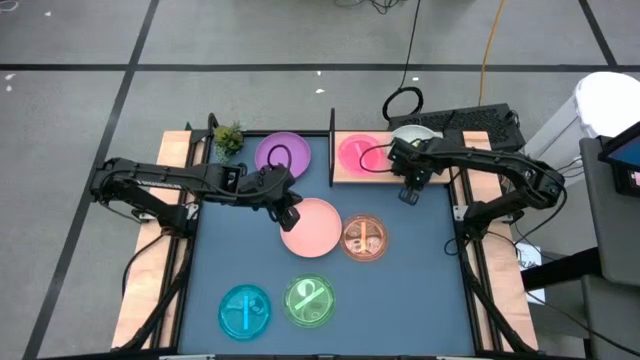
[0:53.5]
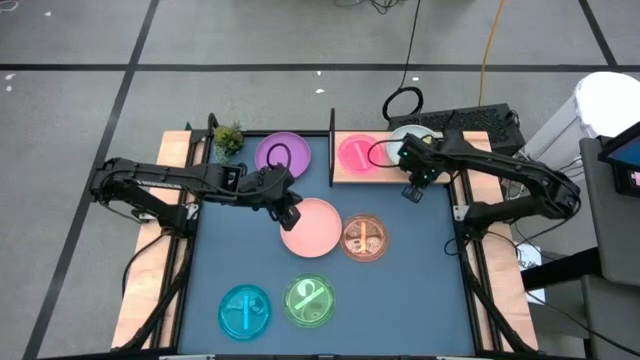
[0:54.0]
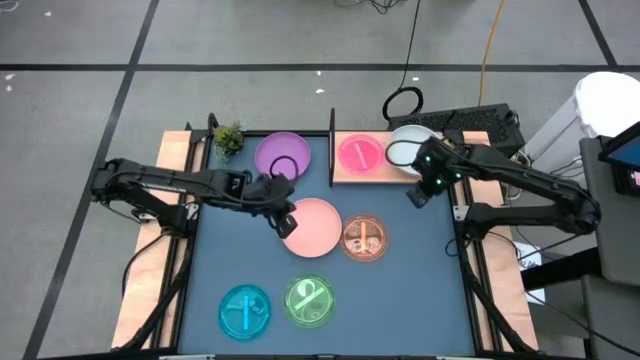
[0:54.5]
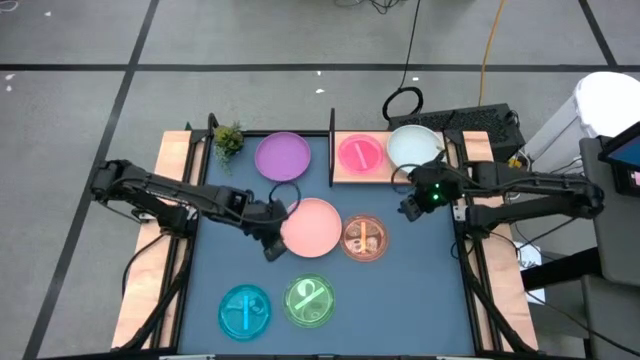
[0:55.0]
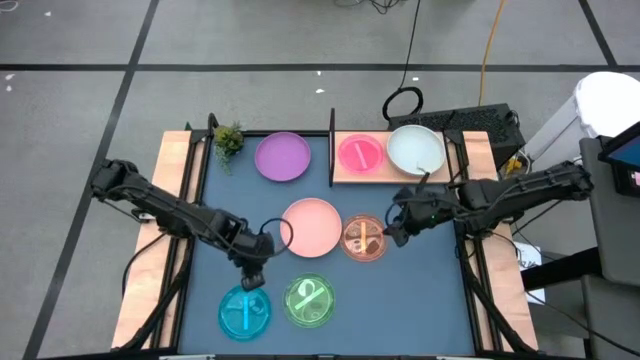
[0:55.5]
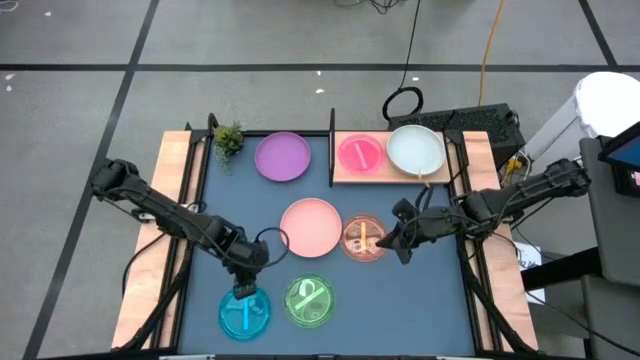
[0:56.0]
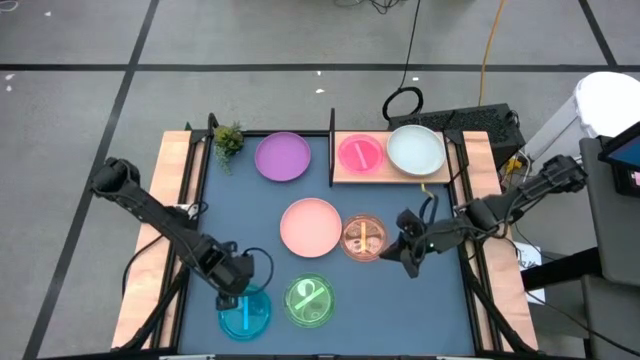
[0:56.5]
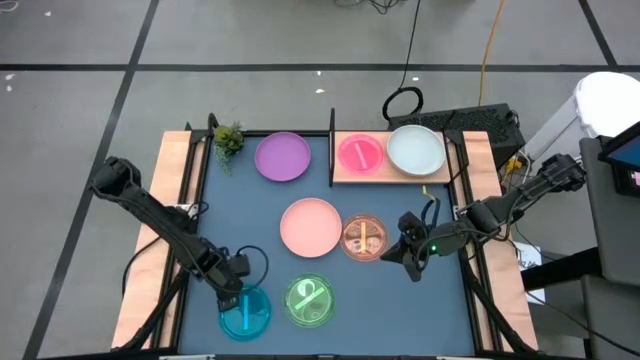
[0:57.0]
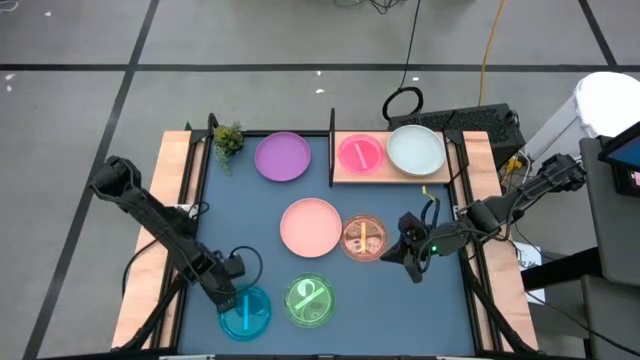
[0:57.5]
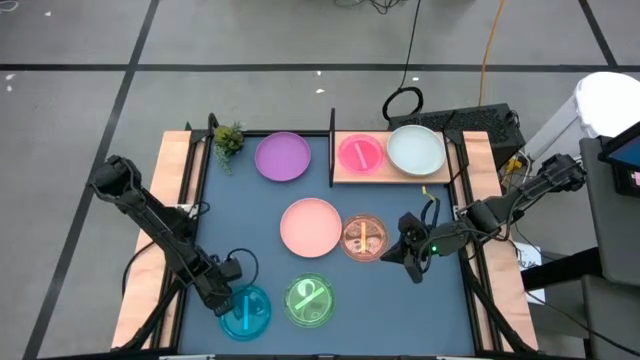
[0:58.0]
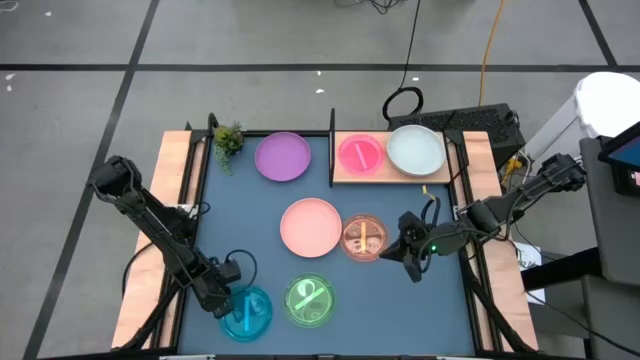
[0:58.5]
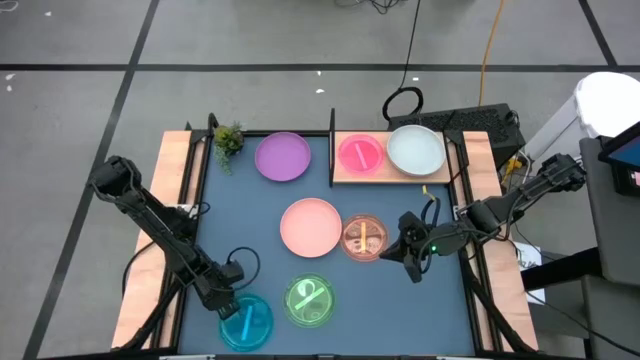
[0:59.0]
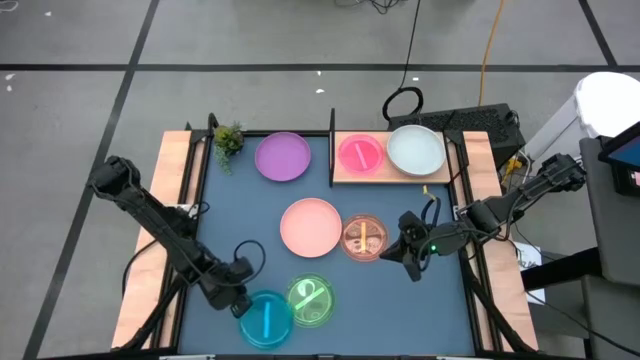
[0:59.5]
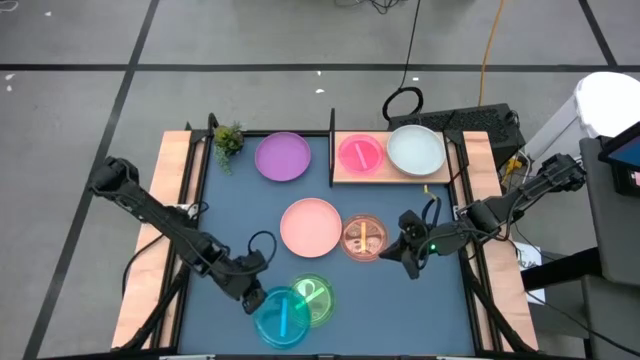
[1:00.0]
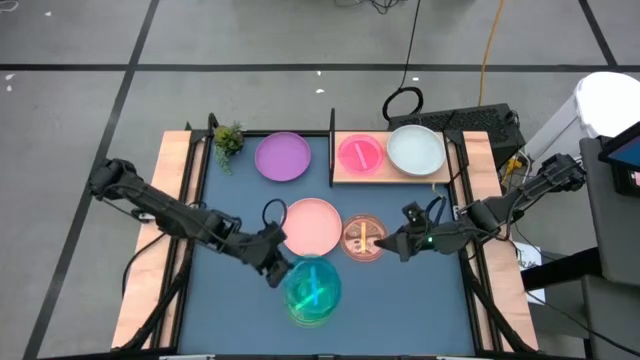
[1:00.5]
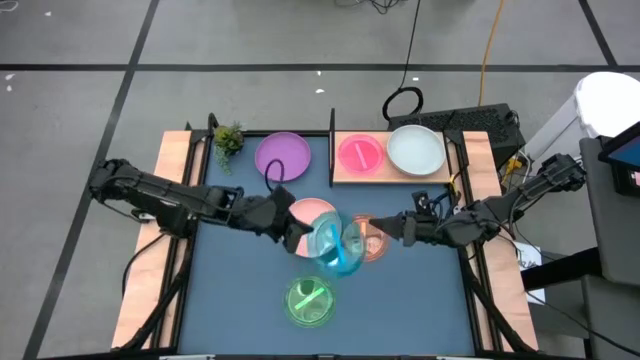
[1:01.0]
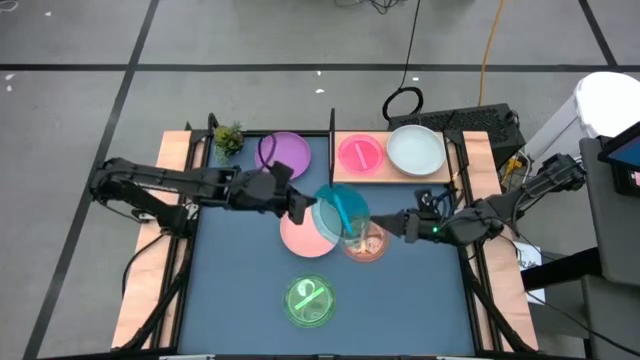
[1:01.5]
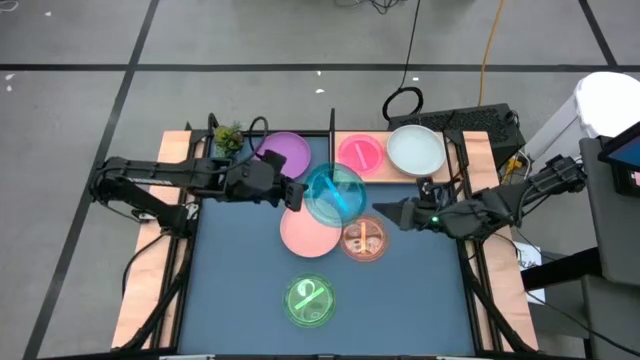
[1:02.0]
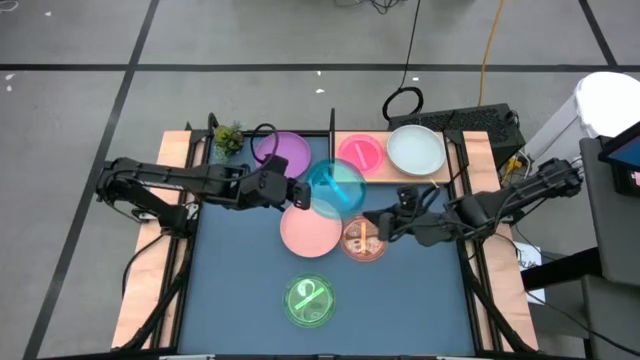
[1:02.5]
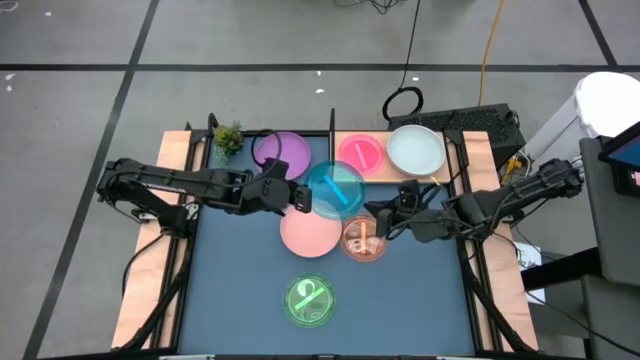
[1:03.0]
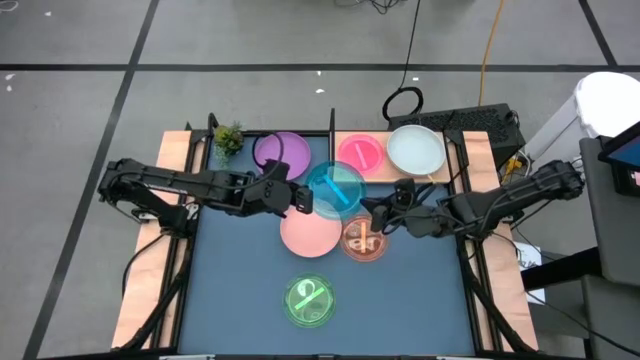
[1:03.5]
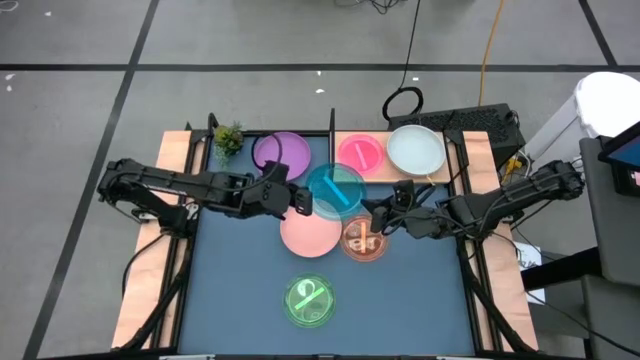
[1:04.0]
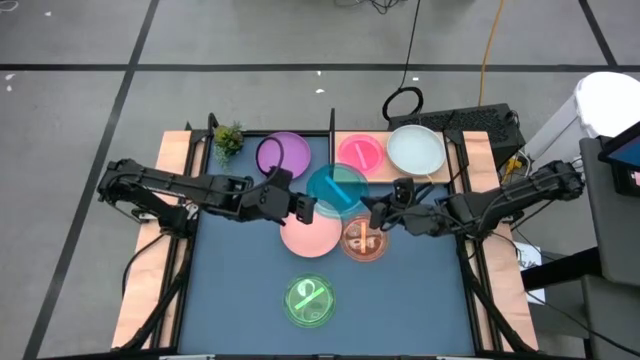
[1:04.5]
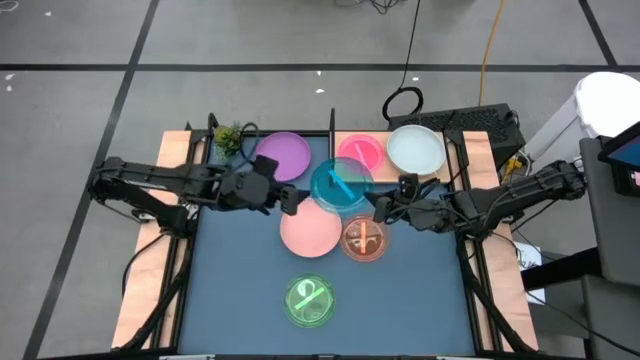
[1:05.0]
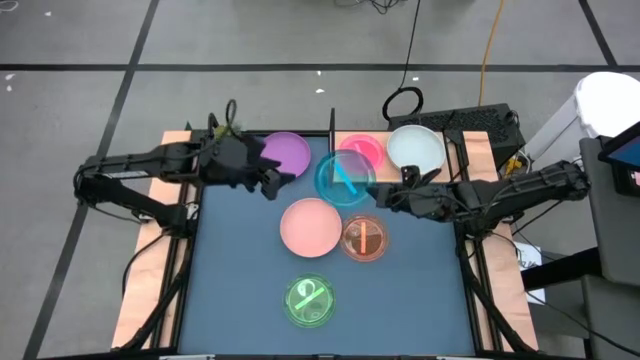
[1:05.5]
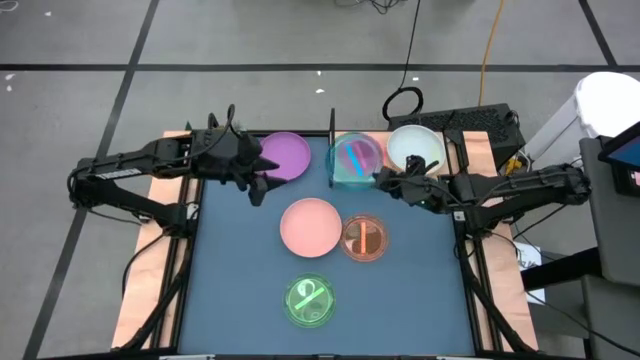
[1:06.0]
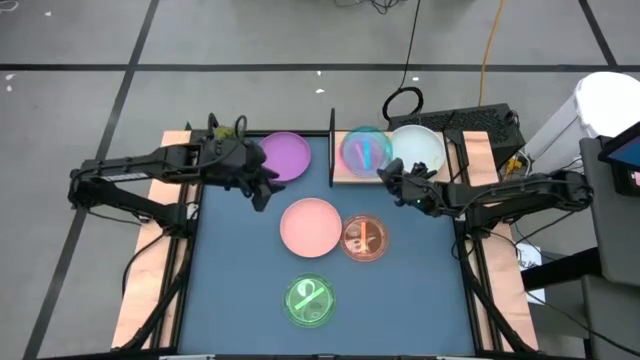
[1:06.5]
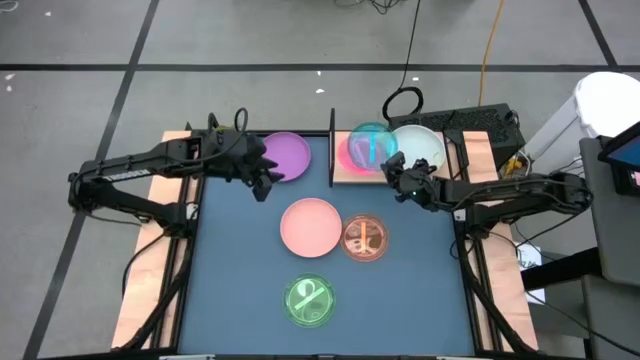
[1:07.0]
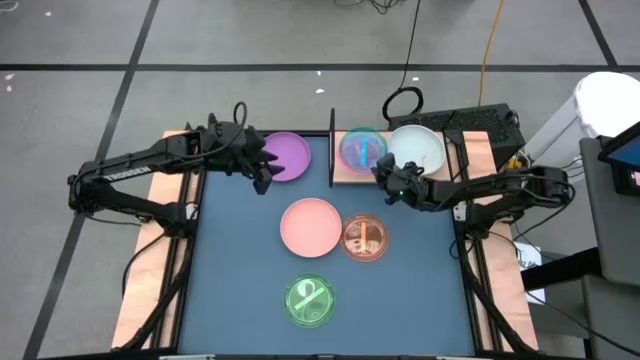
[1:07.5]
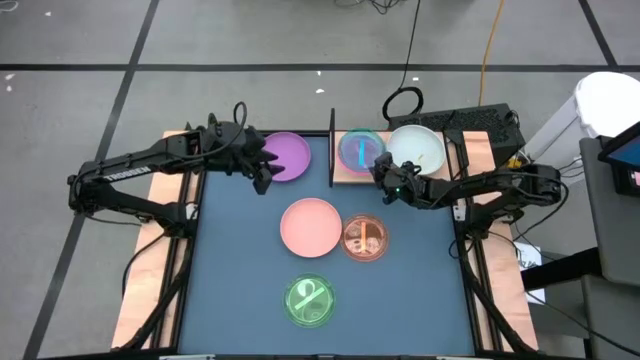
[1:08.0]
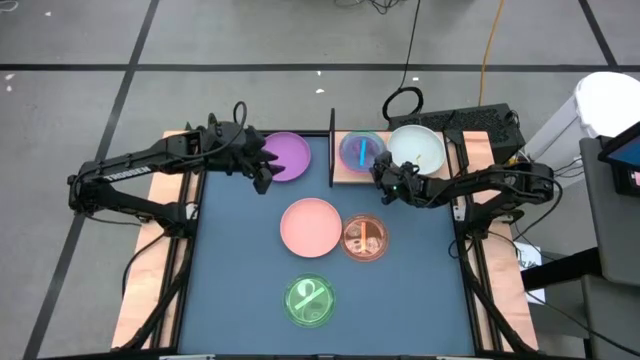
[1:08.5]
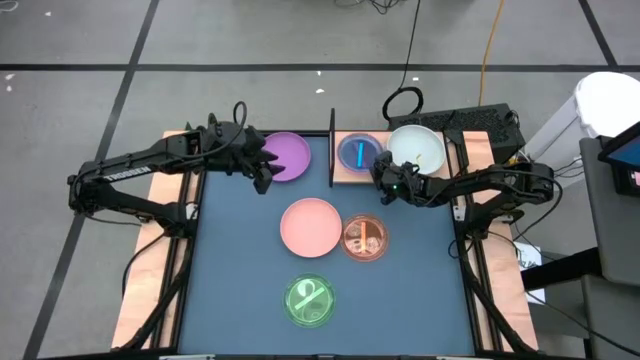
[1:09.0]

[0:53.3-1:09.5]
Task: Place and stack plates onto a shelf
Stack the transparent blue plate on the transparent pink plate on the shelf

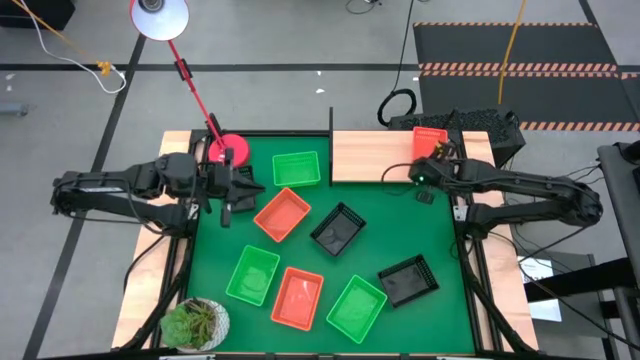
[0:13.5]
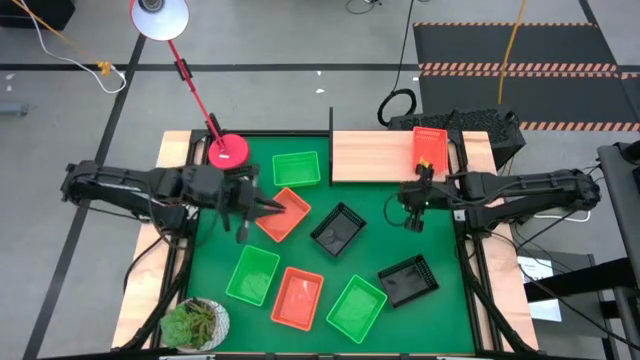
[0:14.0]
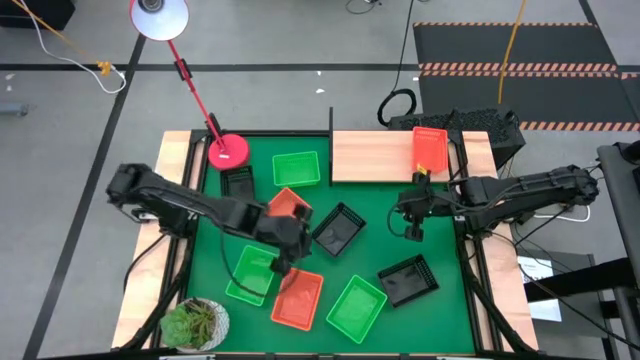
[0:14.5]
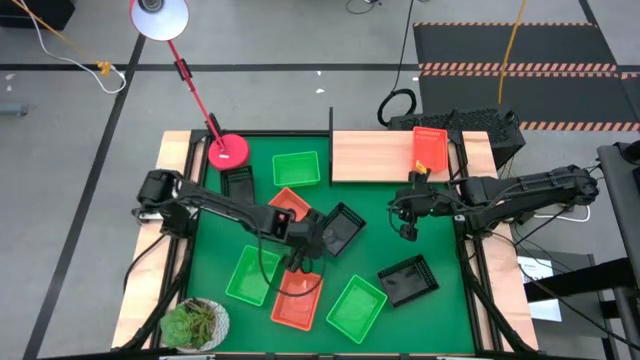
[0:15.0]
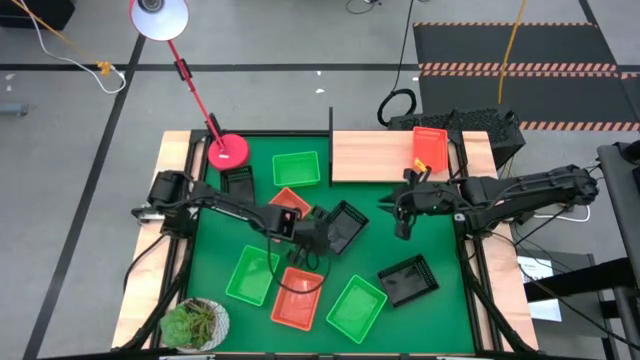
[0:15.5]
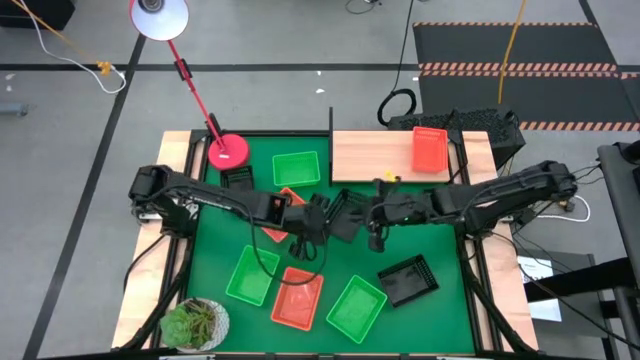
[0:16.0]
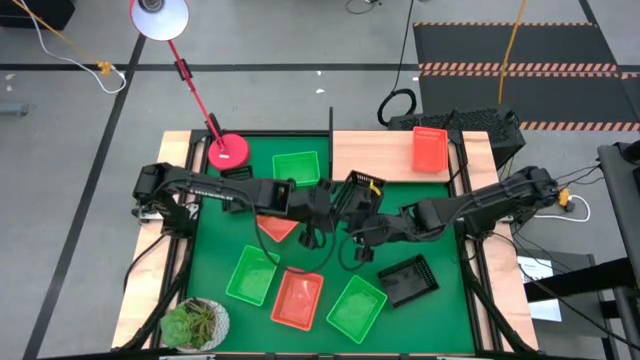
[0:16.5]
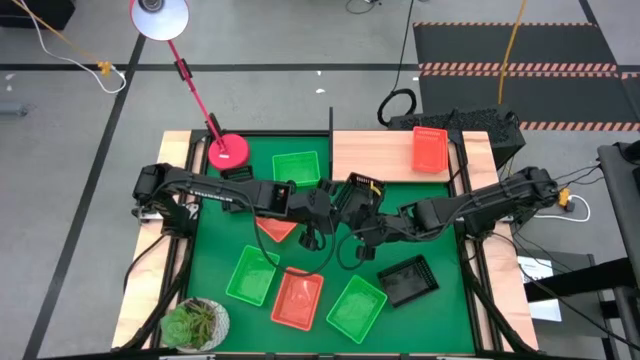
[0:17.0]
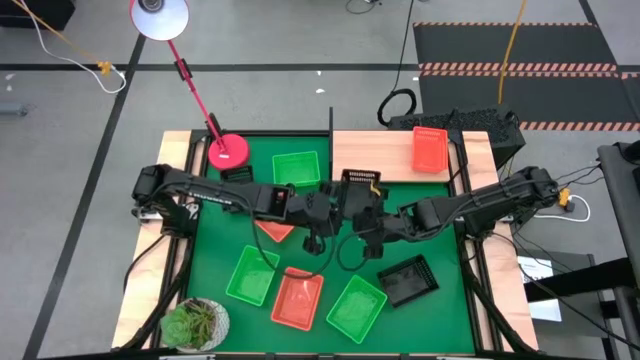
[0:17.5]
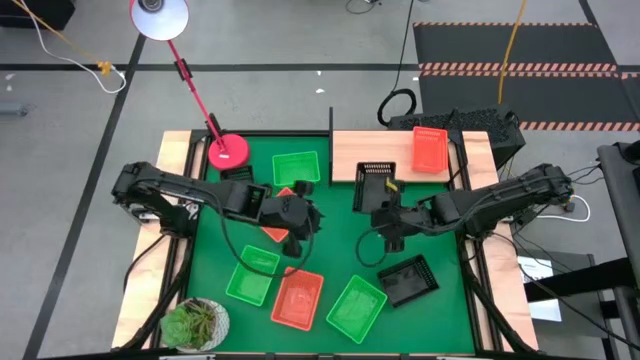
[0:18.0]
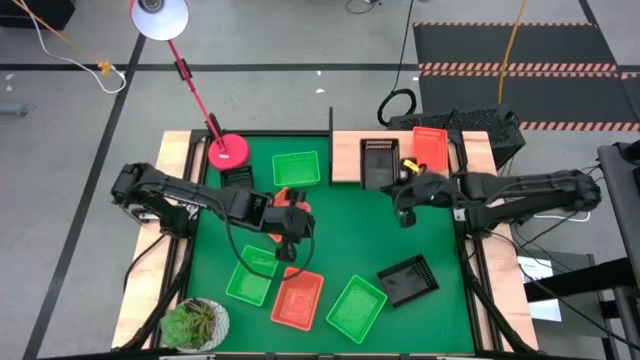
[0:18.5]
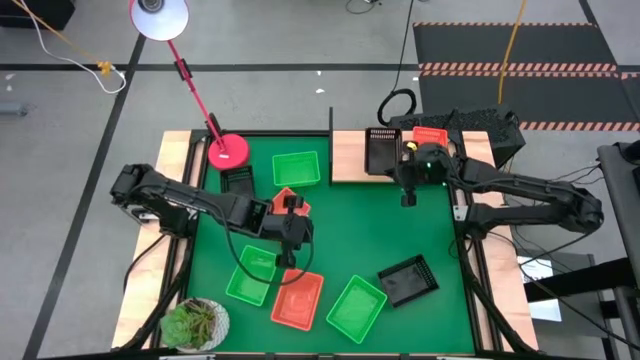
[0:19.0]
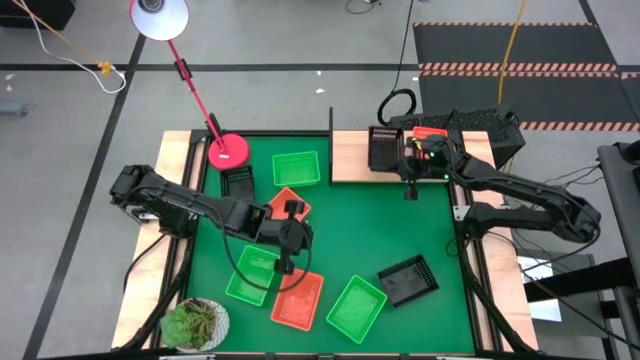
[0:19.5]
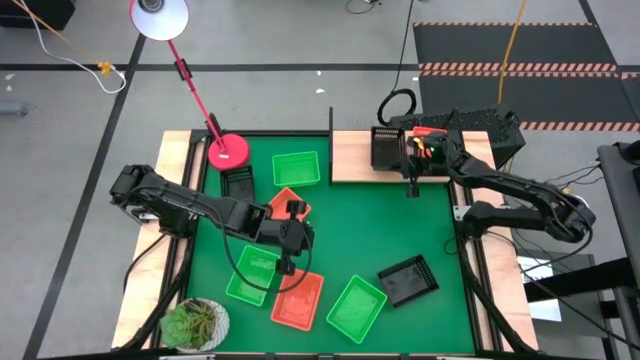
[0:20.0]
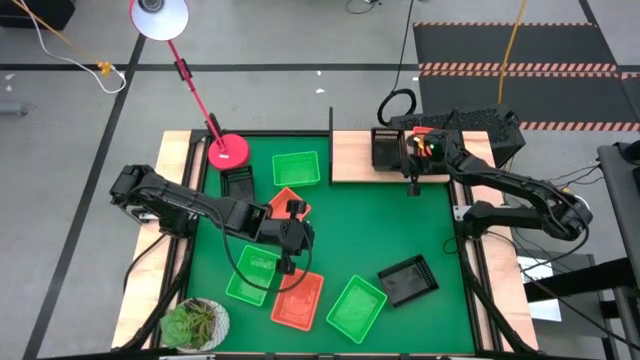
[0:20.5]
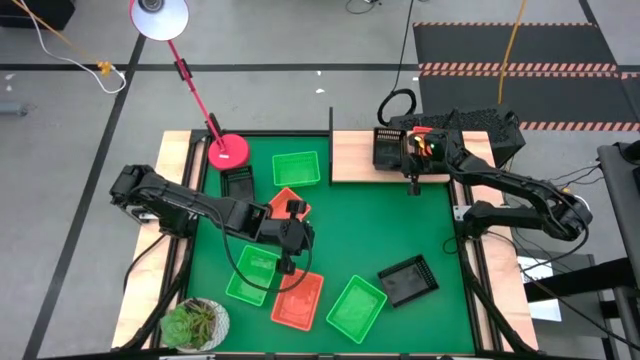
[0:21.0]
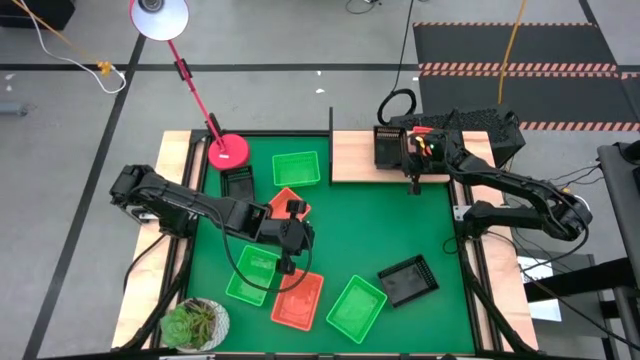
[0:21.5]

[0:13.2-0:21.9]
Task: Stack baskets on shelf by color
Put the center black bin on the shelf
